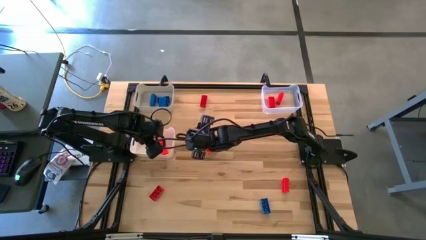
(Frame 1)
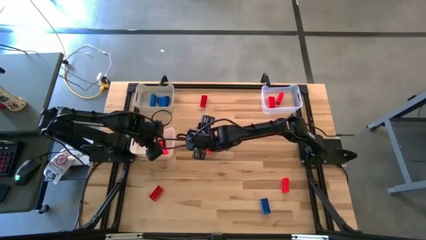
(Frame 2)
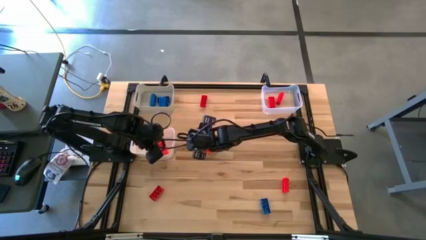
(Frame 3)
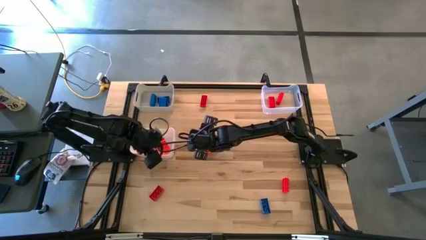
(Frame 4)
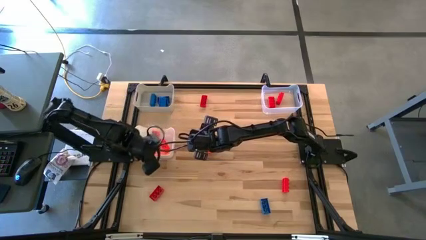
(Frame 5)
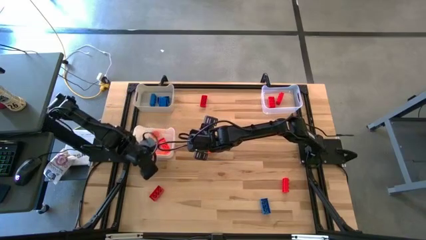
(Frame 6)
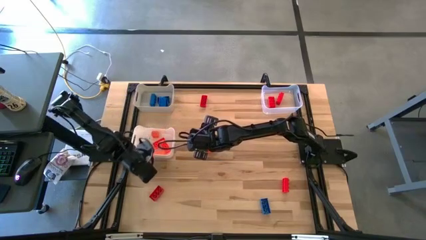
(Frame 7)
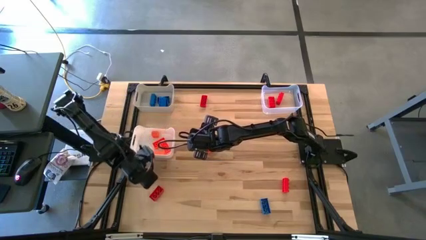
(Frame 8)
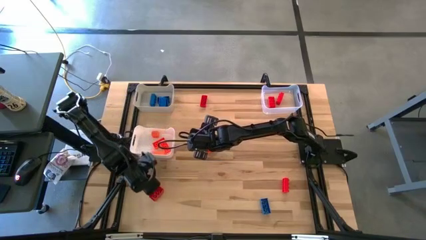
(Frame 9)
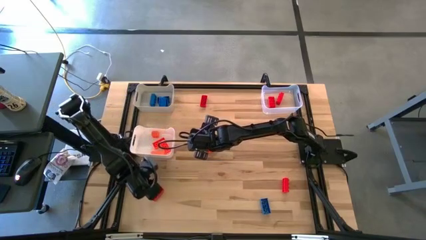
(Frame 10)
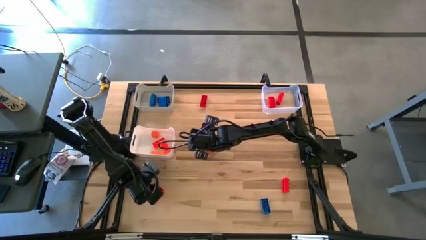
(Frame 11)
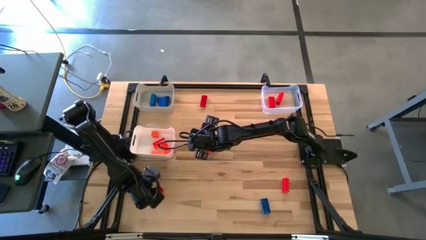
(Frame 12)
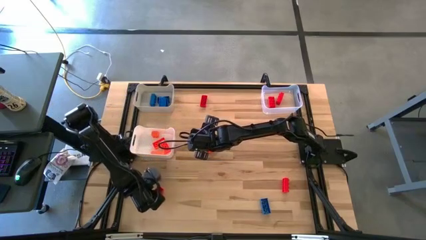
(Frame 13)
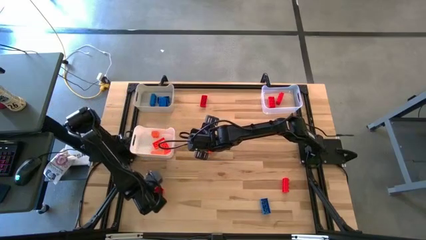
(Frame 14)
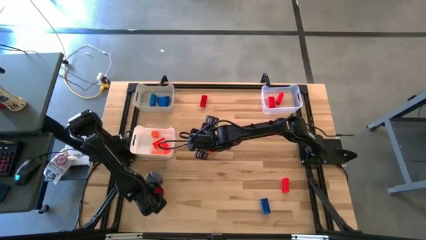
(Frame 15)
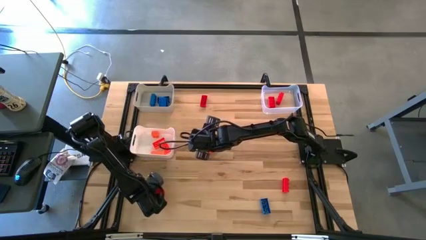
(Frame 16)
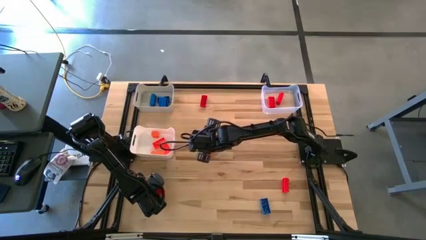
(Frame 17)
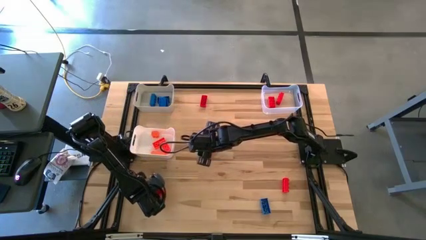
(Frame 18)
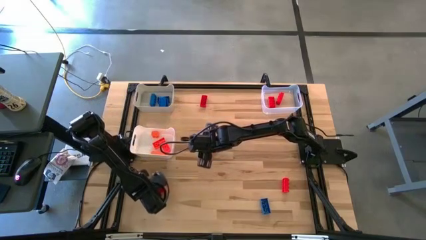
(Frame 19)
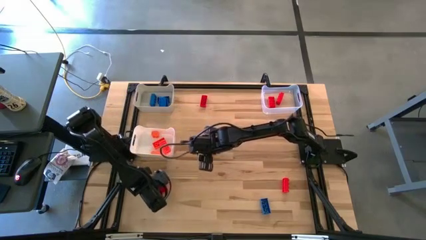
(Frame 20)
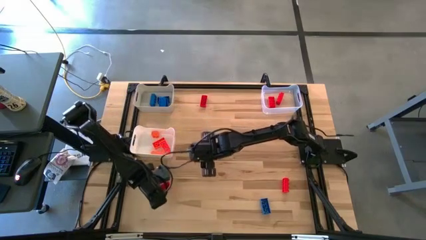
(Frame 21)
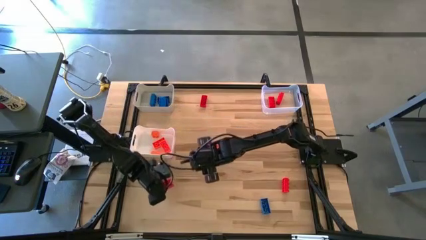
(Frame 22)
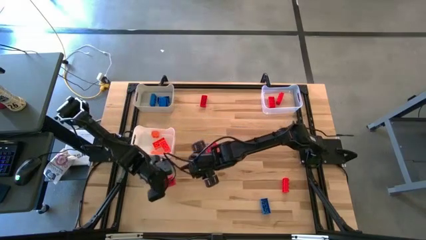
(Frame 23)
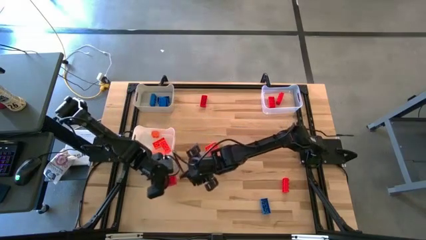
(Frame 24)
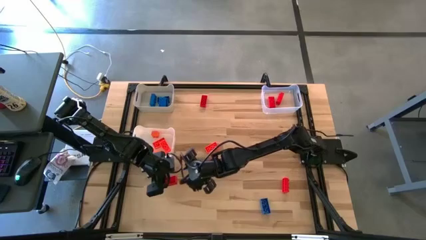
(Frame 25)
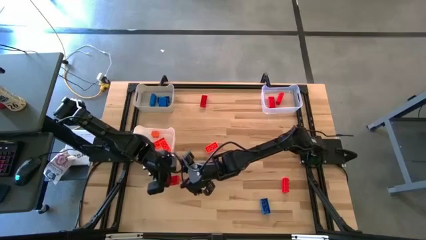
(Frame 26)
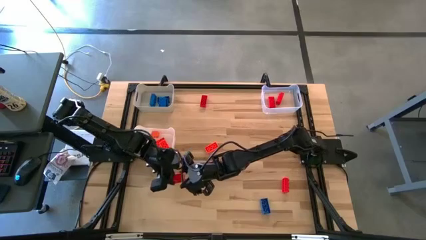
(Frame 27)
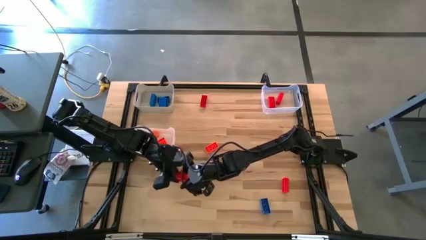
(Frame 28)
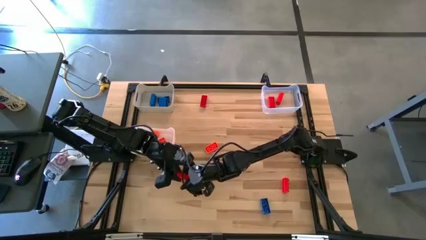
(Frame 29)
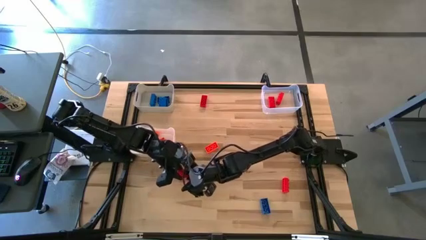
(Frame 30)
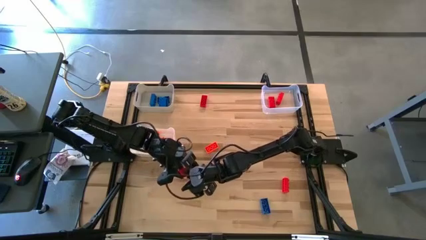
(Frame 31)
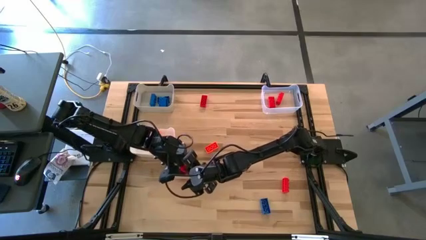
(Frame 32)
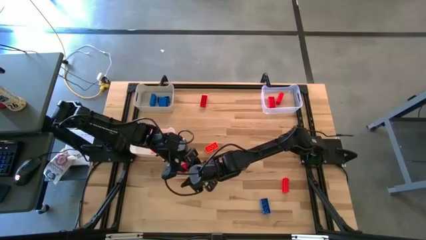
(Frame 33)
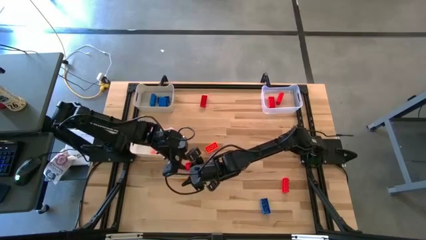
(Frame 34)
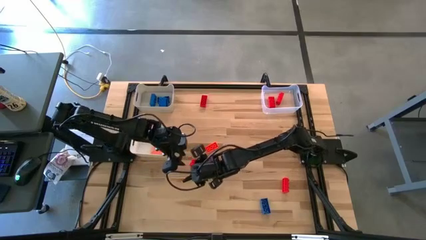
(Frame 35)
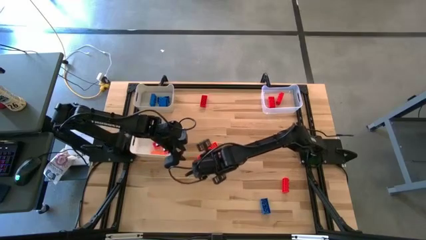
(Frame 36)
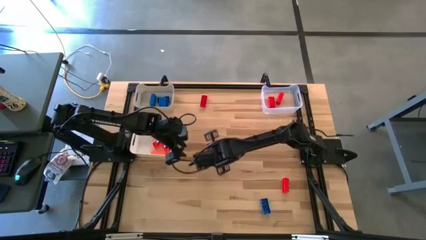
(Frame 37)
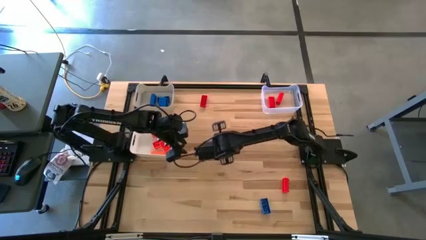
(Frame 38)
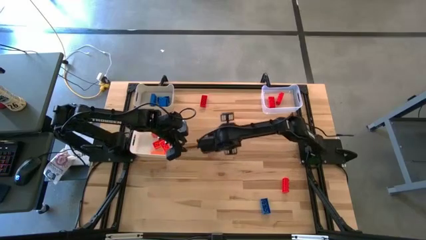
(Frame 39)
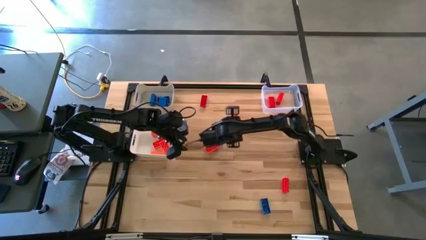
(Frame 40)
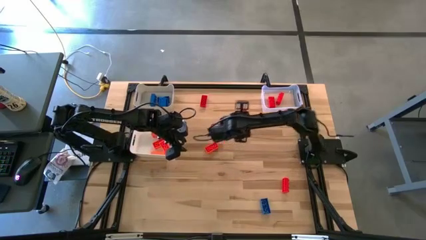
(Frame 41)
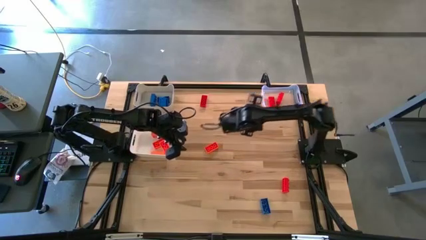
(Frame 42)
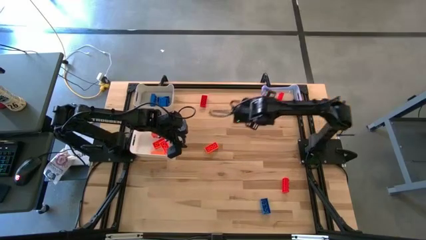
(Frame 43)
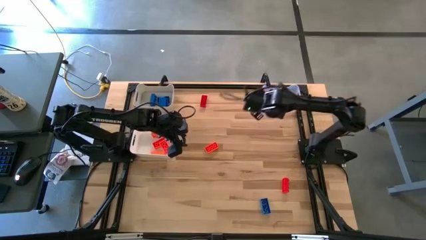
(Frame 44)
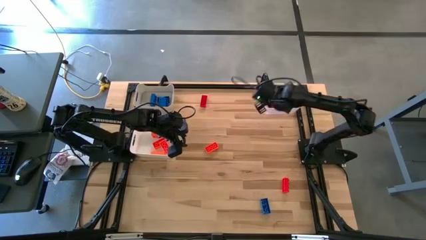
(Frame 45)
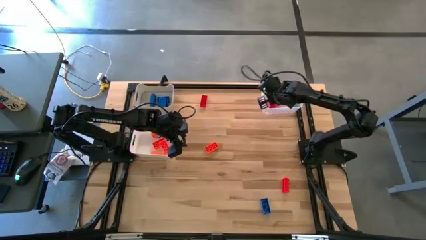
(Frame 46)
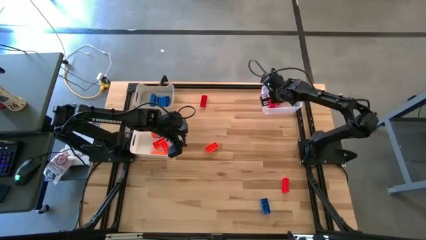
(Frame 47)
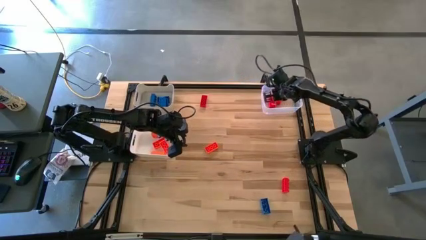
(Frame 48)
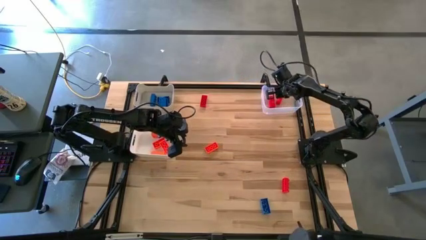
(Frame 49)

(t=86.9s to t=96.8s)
Task: Sort & place blocks by color
Put the red game piece into the transparent bin

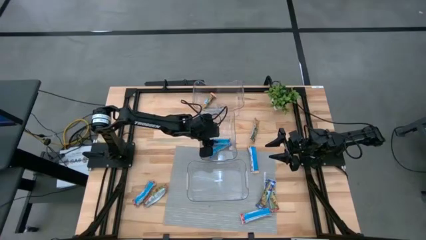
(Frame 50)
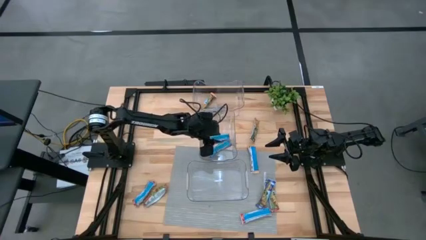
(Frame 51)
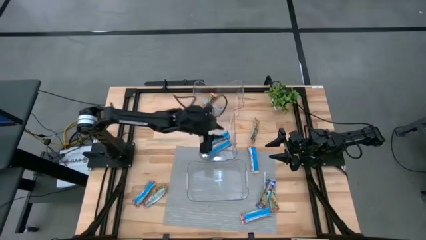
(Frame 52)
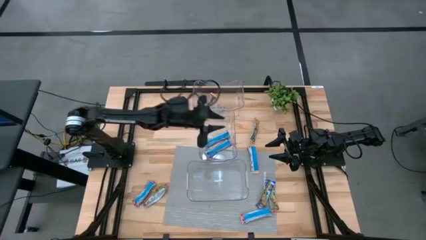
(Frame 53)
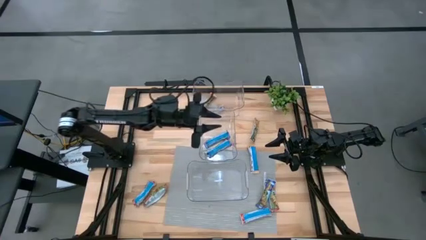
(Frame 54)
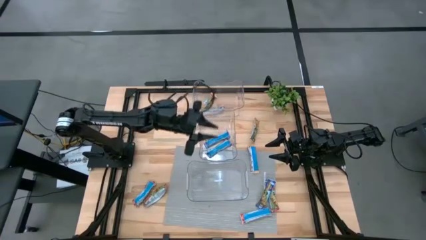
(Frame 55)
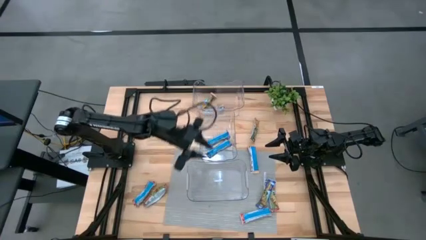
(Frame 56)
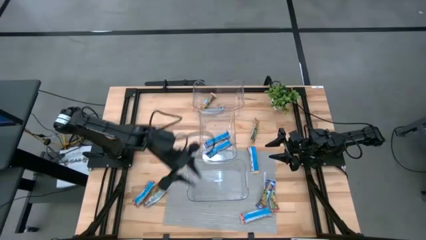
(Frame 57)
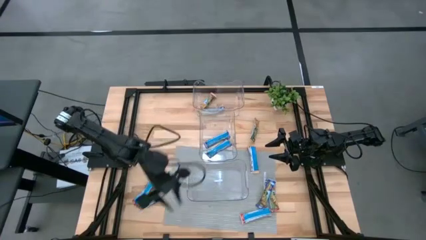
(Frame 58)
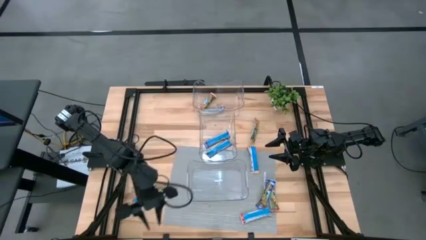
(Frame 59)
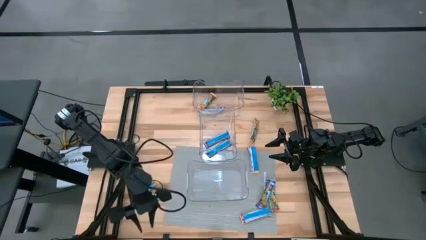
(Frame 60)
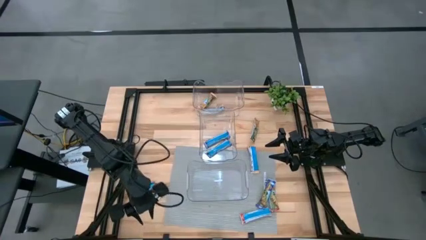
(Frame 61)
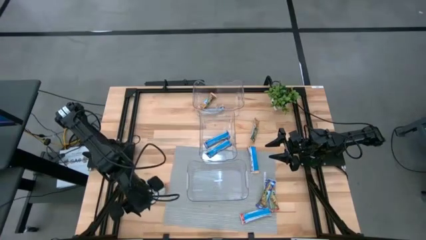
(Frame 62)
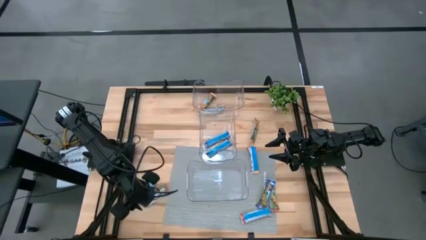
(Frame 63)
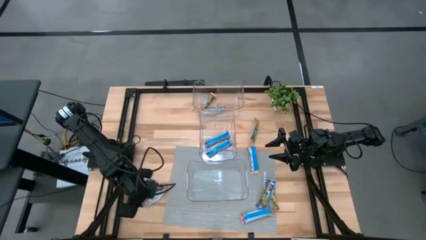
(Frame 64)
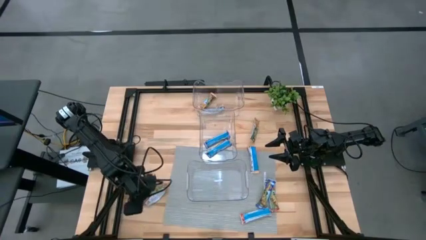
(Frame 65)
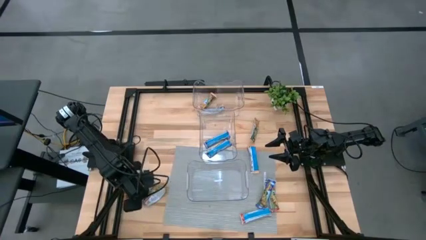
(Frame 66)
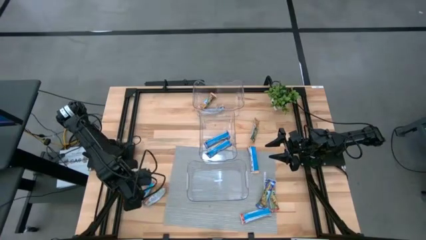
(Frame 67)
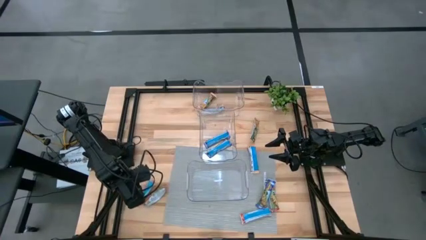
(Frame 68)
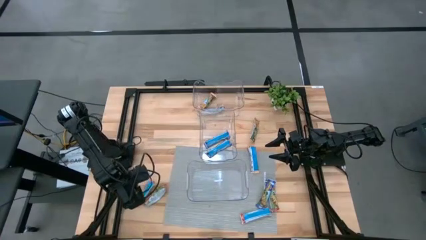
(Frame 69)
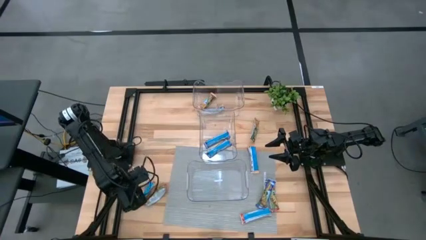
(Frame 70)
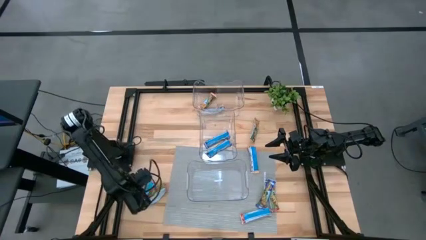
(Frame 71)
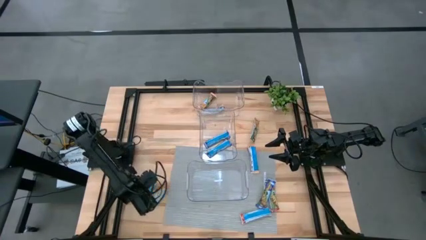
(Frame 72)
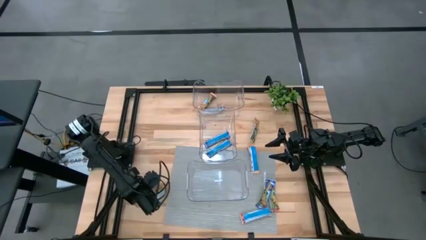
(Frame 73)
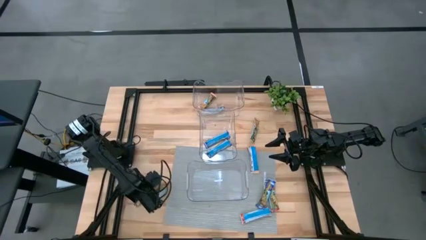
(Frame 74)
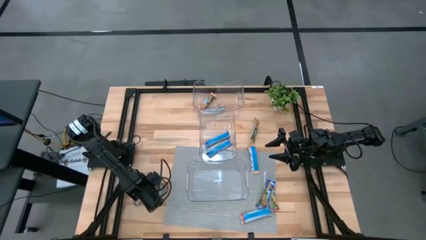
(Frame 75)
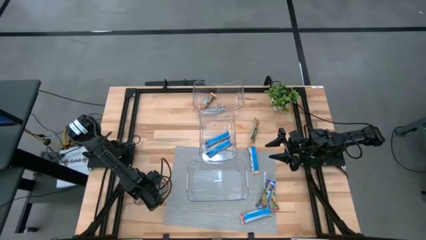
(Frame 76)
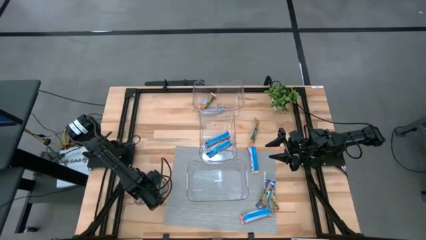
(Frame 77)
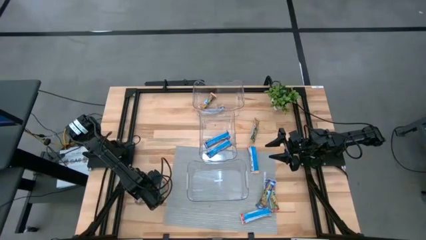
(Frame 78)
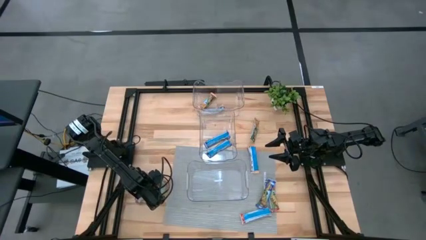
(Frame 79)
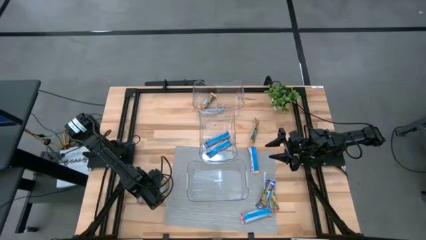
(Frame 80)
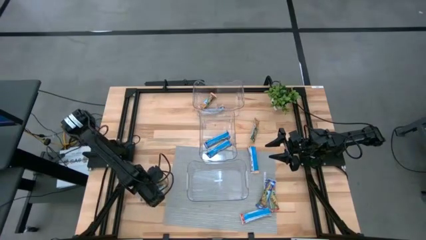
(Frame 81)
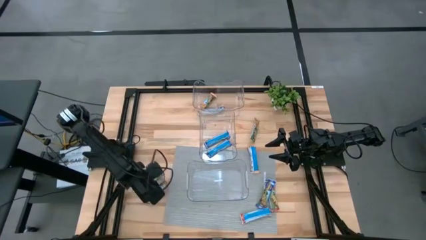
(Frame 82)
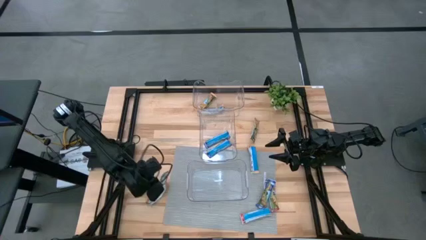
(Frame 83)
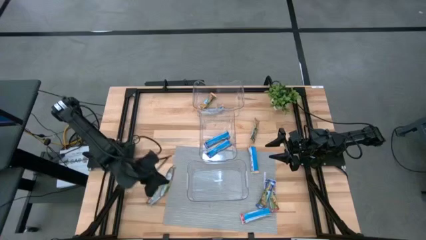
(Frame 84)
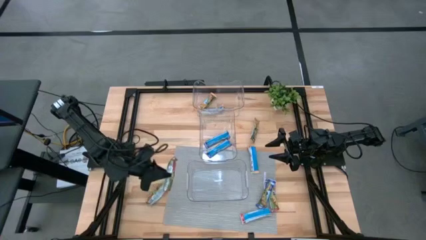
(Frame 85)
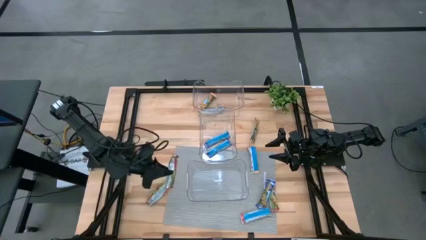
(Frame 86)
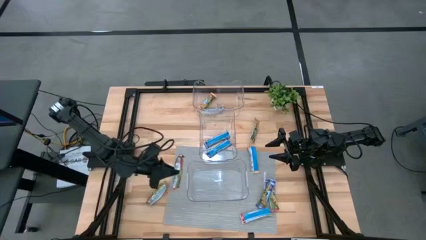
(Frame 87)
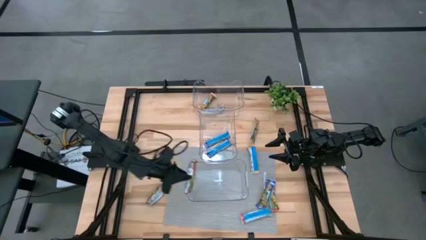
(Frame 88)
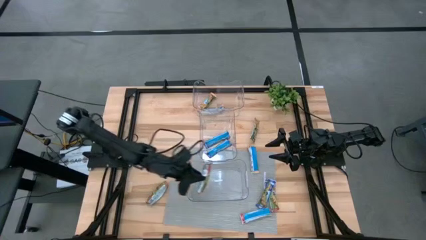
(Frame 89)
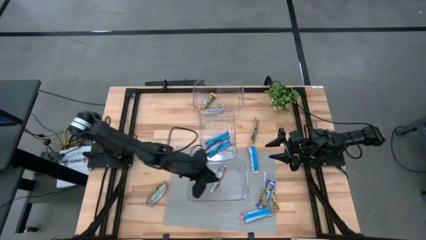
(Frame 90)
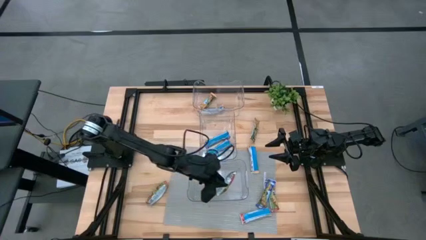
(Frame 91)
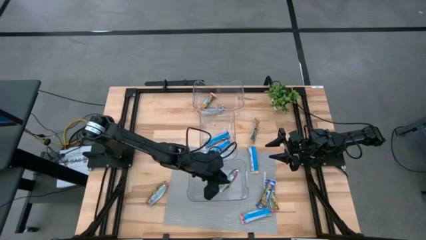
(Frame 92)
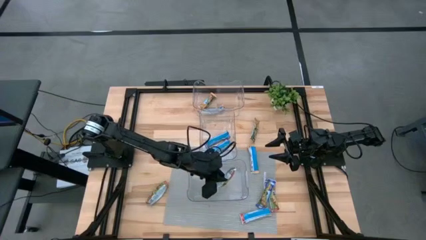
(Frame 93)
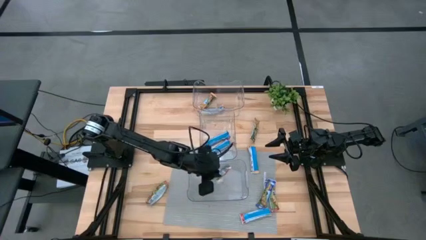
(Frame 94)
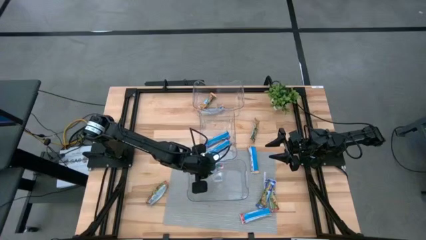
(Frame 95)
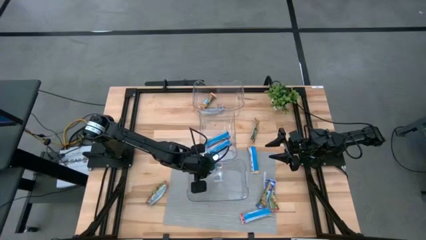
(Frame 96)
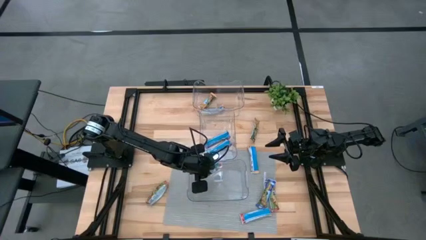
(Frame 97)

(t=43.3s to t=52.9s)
Task: Pick and place Granola Bars by type
Put the red granola bar into the bottom transparent bin
